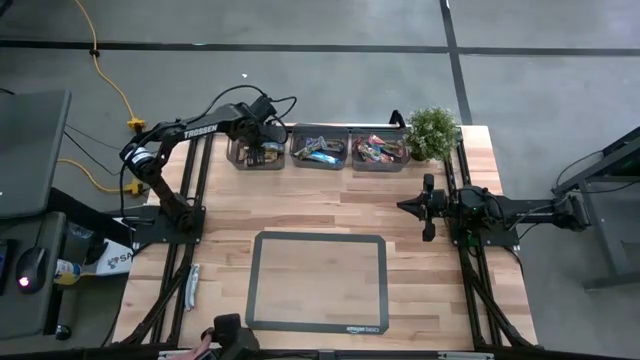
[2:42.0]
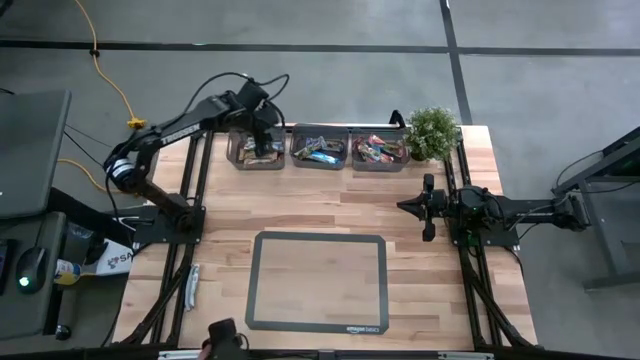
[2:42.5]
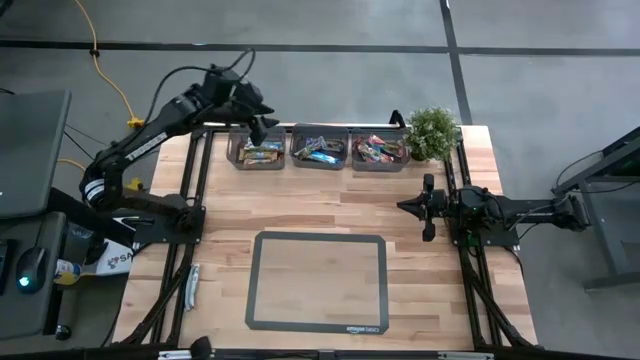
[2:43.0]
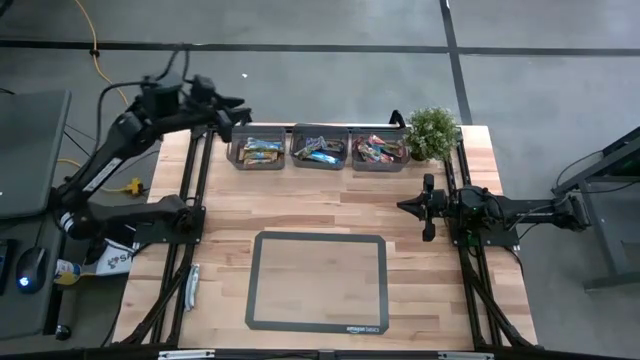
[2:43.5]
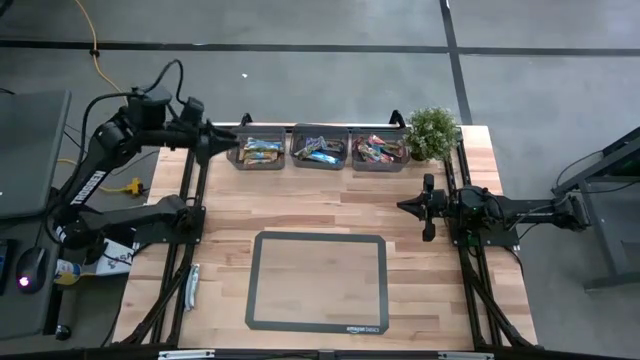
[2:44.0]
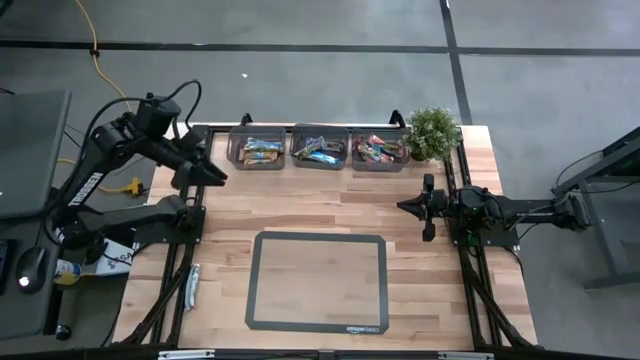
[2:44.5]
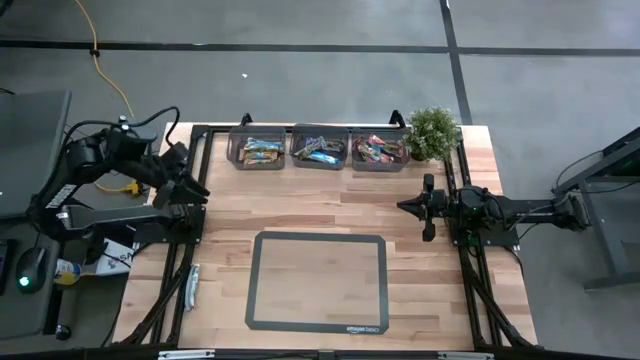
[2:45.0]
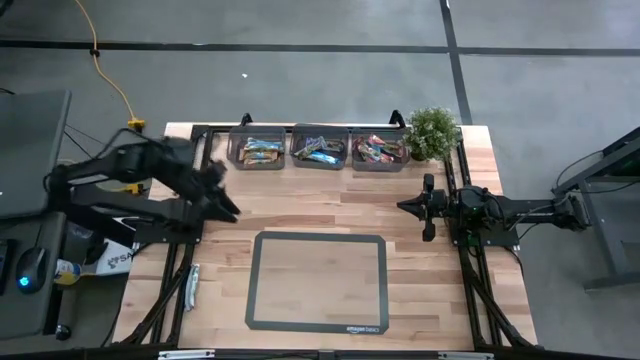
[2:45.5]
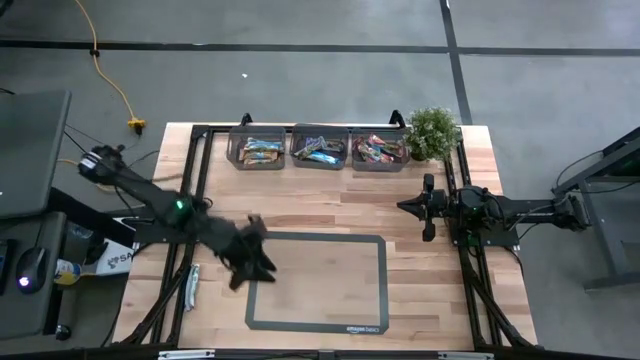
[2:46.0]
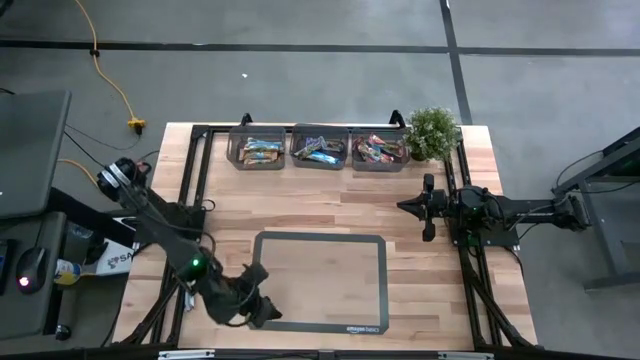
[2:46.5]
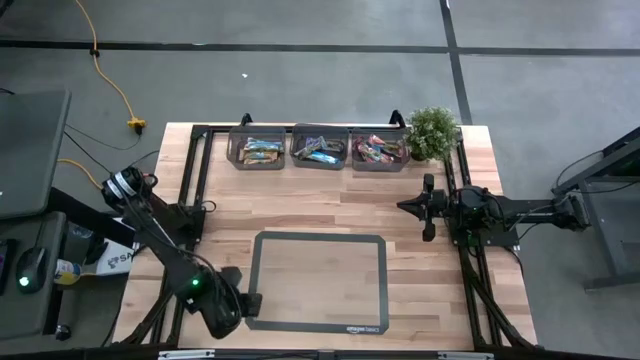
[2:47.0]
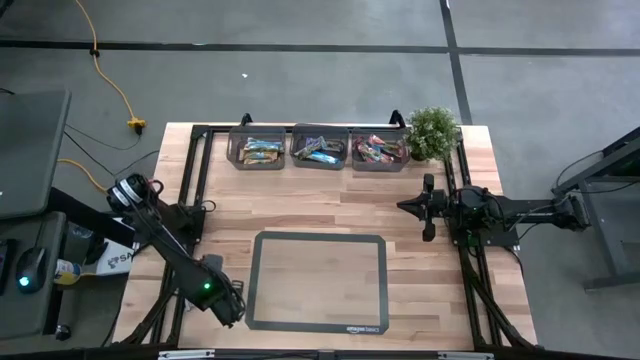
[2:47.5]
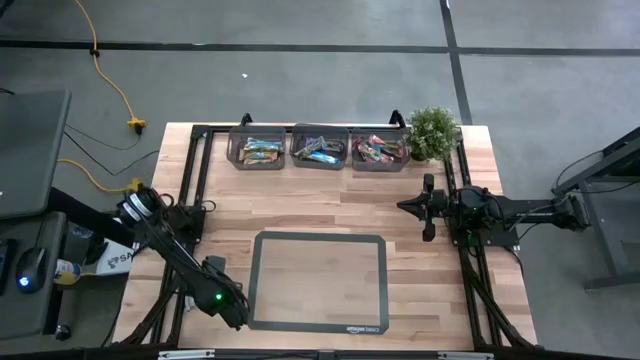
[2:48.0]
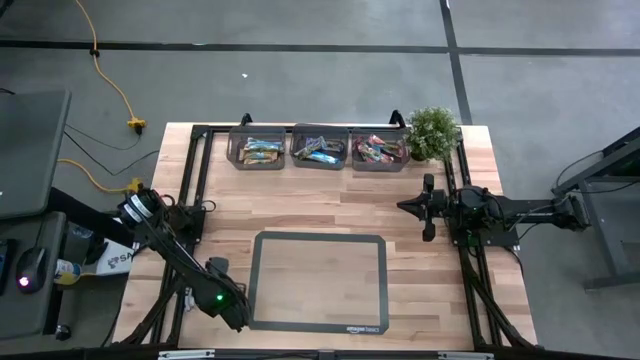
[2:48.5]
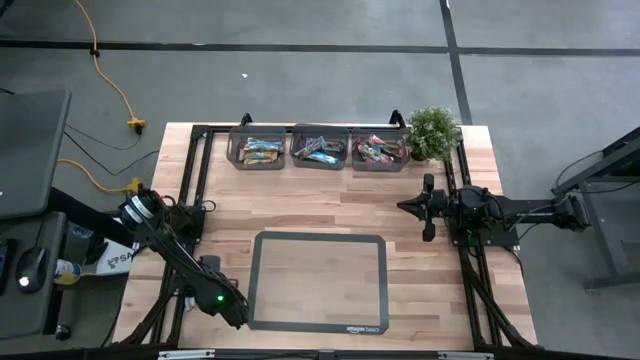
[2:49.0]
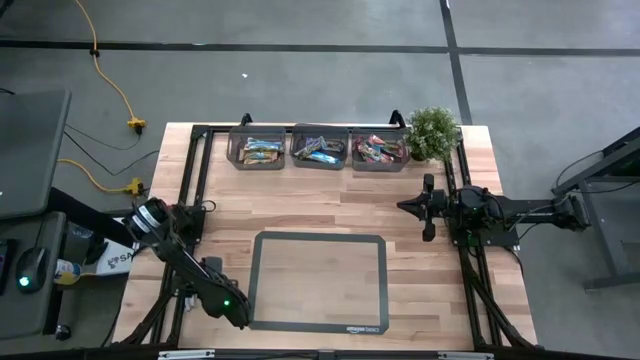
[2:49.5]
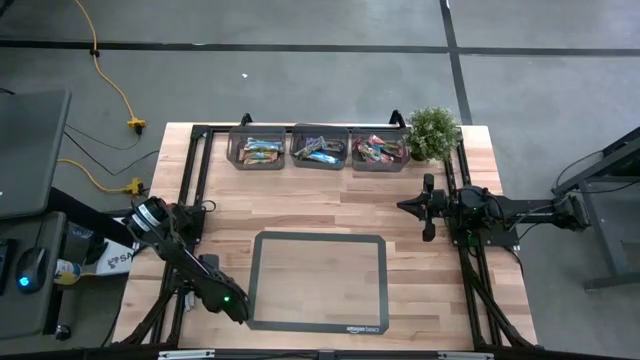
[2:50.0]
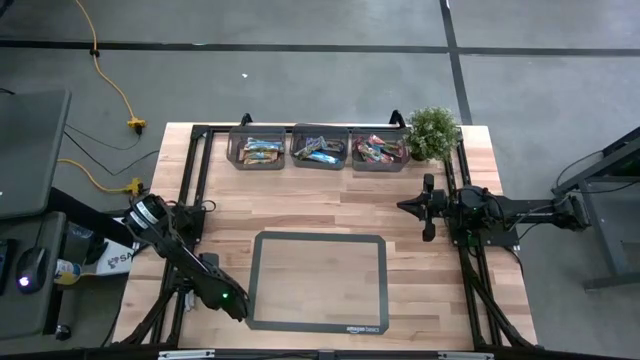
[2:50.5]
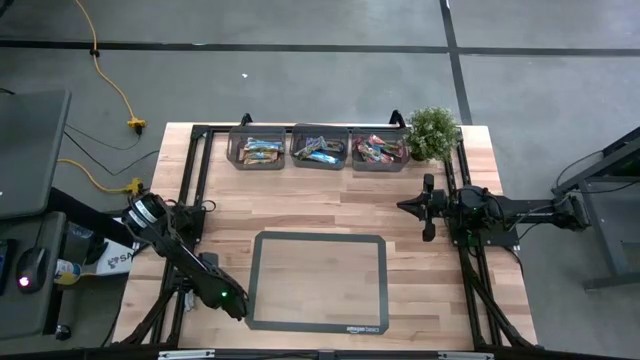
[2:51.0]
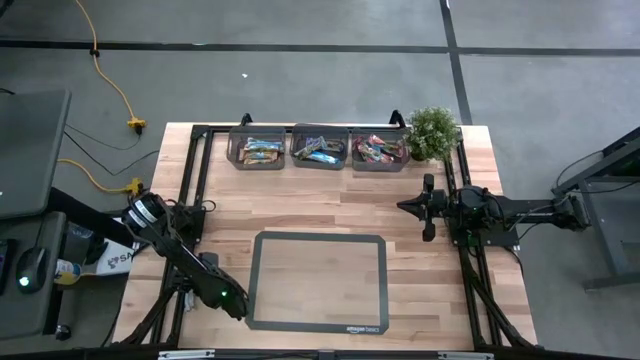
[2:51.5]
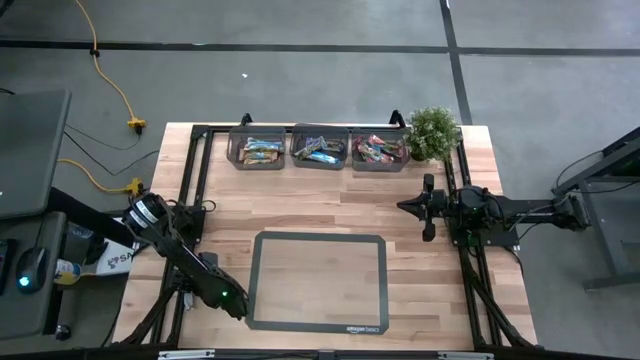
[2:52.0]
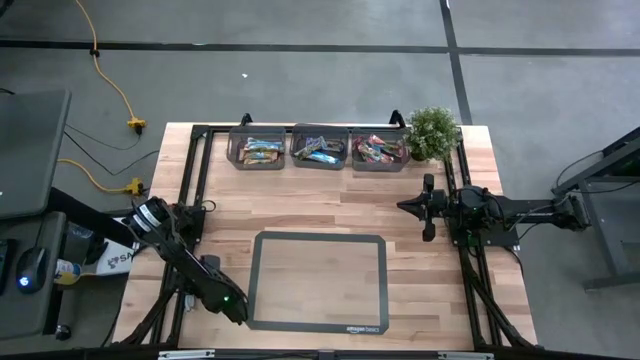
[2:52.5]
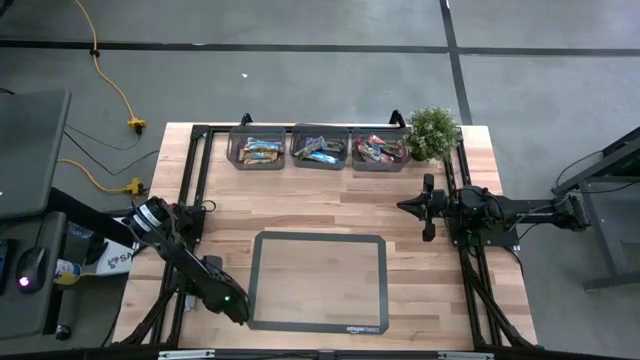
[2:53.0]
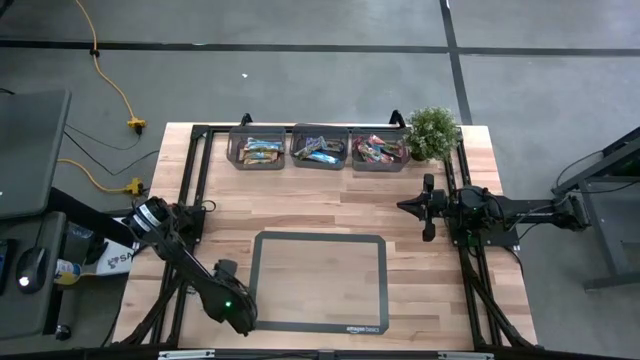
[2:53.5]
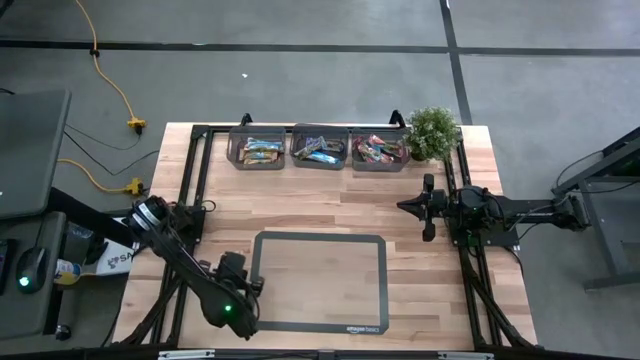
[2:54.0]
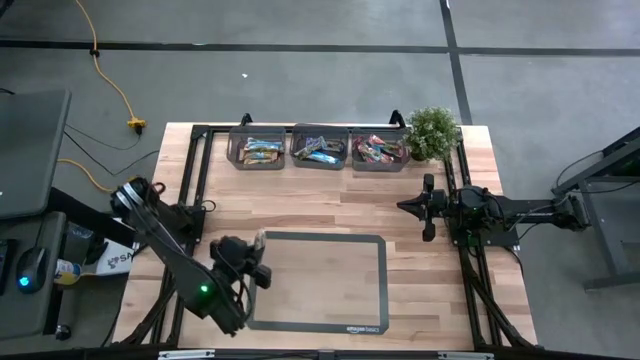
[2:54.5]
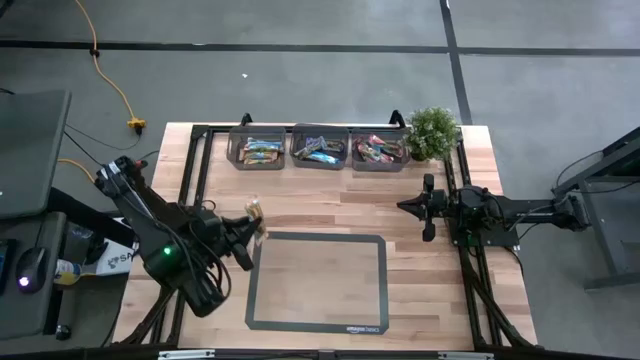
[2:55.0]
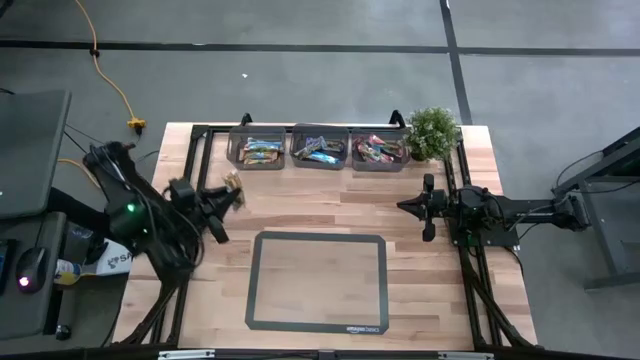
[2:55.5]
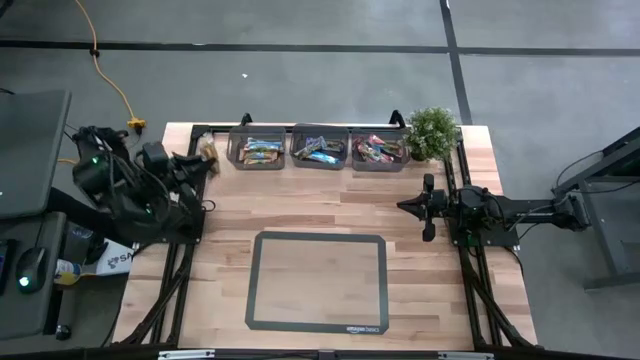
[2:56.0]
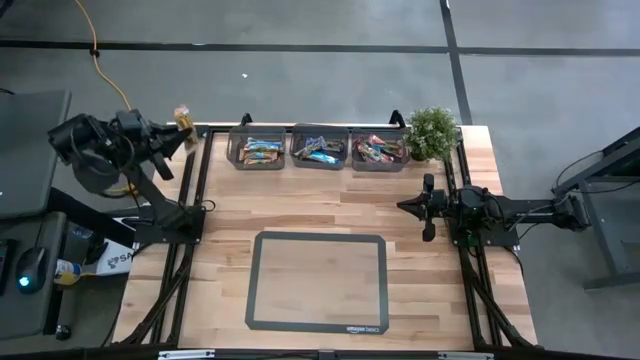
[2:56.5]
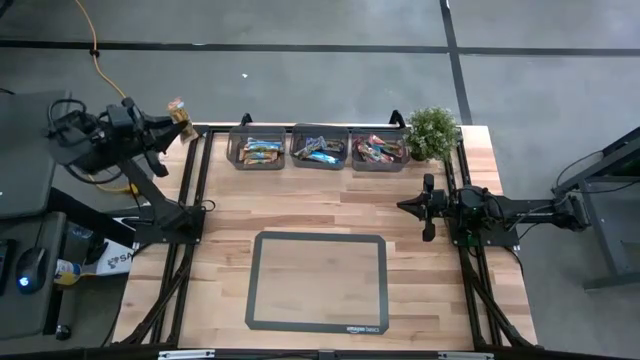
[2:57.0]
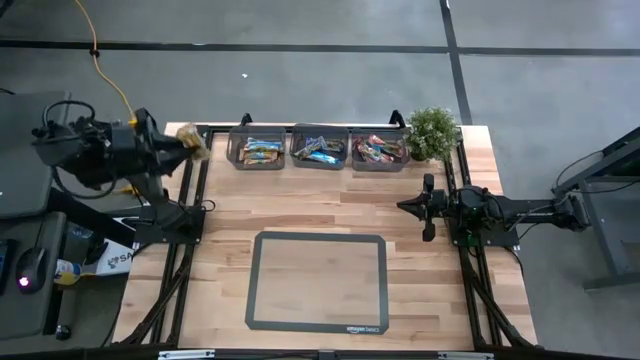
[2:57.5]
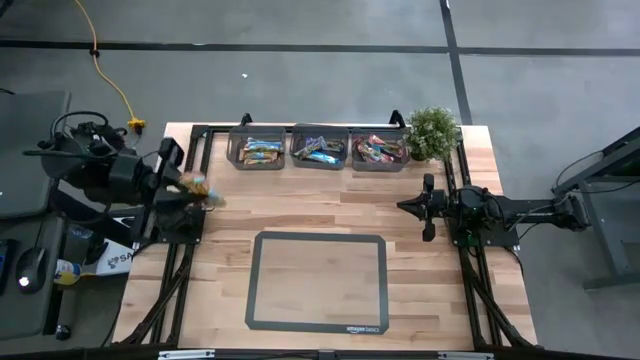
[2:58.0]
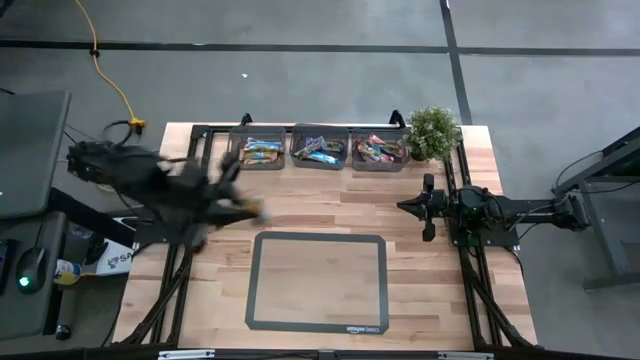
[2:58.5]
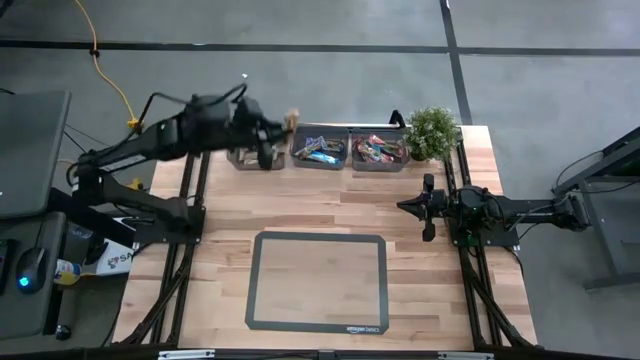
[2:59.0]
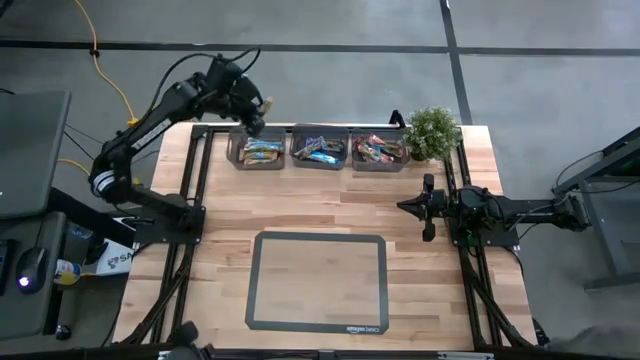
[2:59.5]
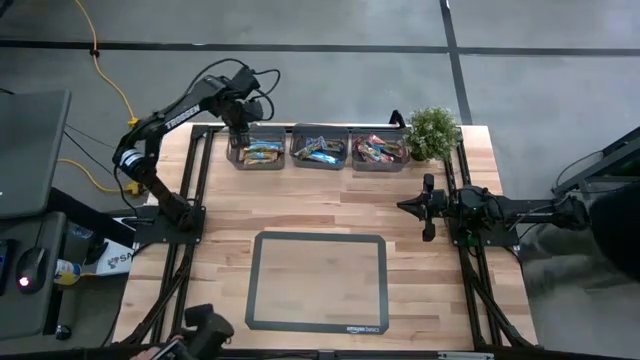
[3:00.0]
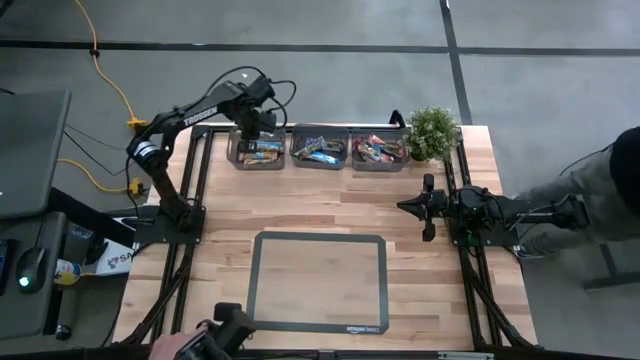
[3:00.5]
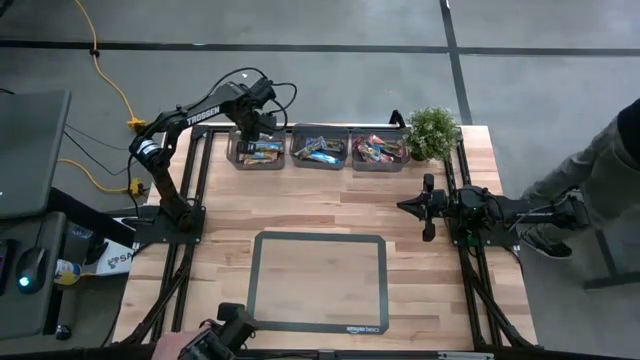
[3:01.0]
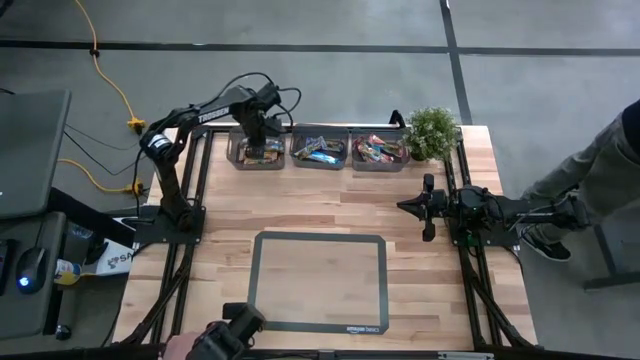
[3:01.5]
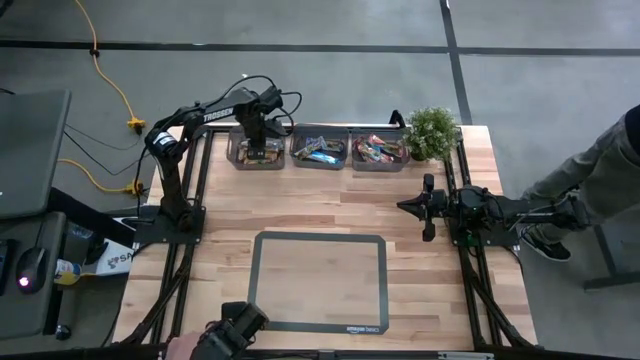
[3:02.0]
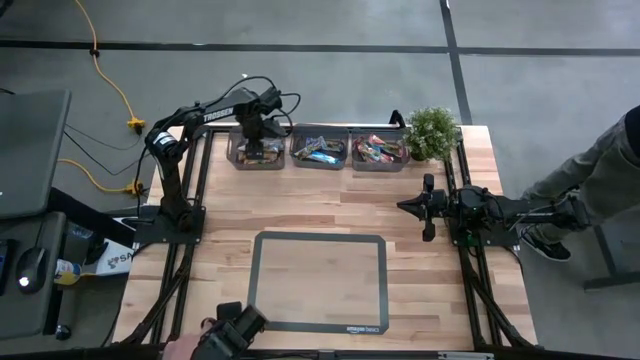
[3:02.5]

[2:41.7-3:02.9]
Task: Pick and place Granola Bars by type
Put the orange granola bar into the left black bin
